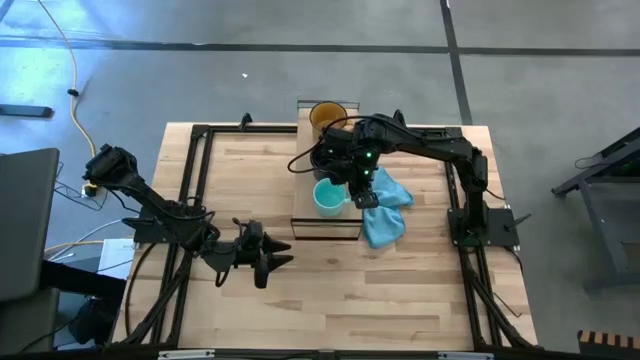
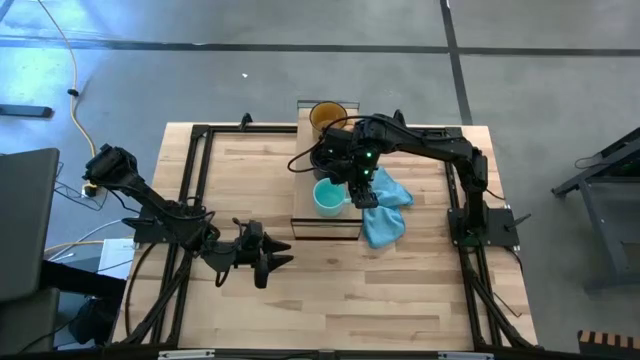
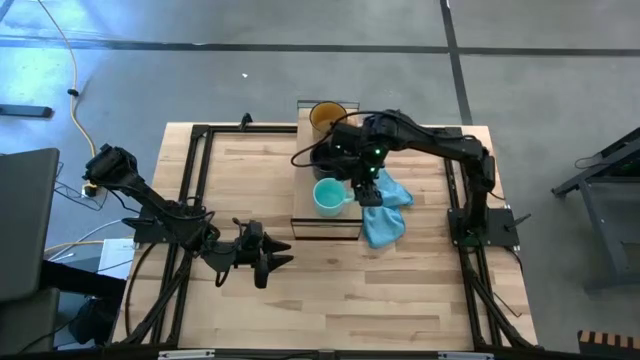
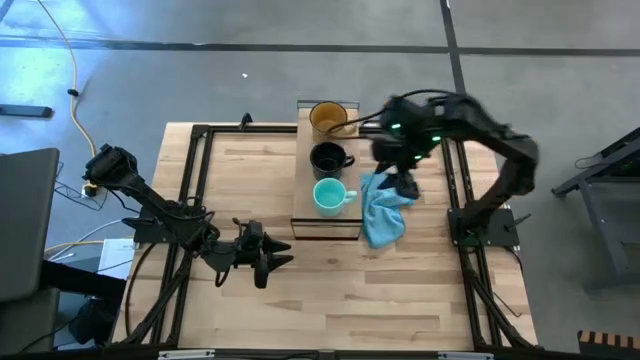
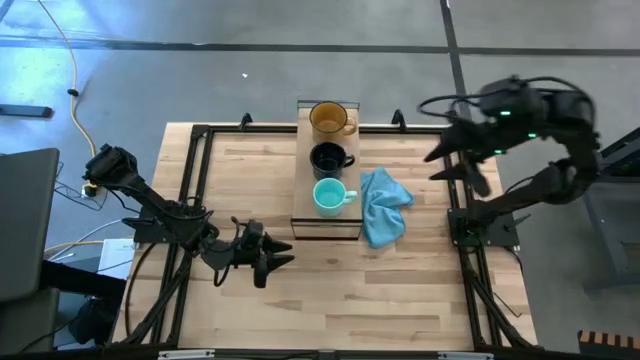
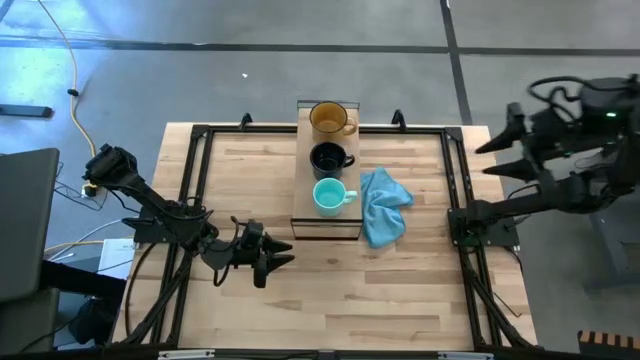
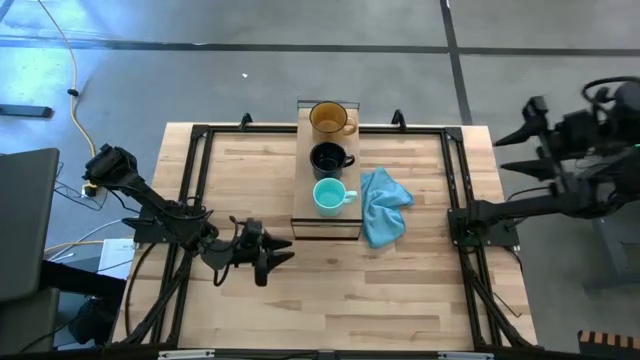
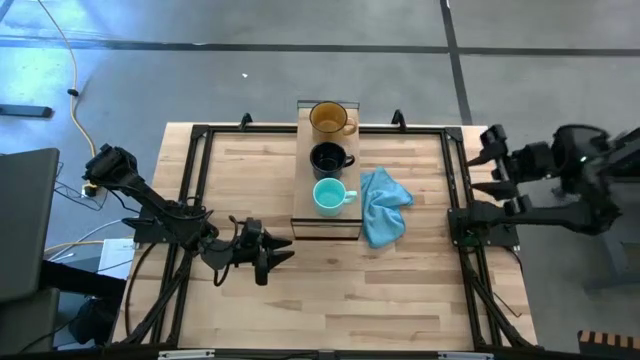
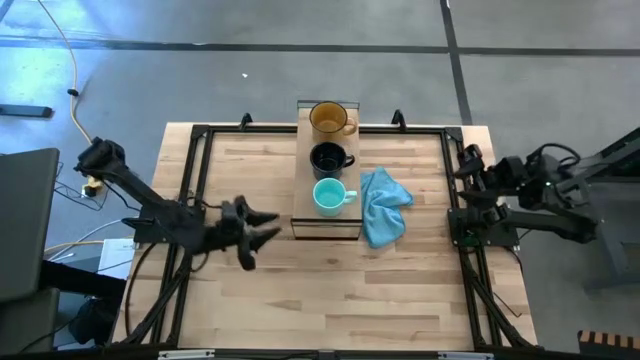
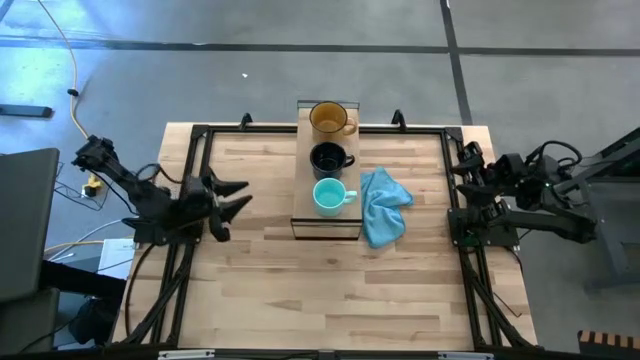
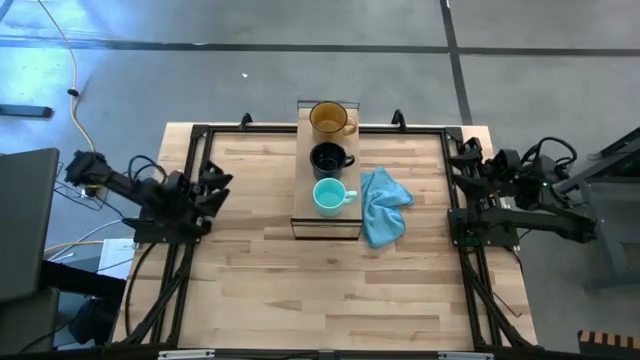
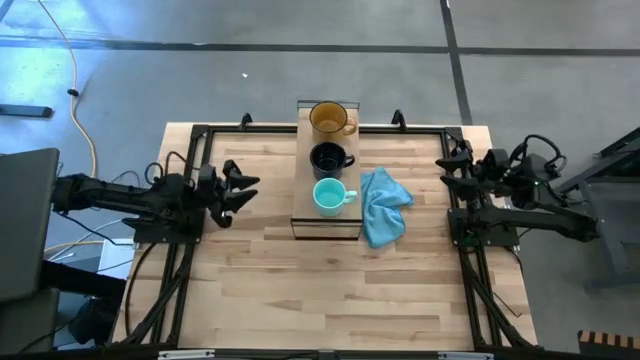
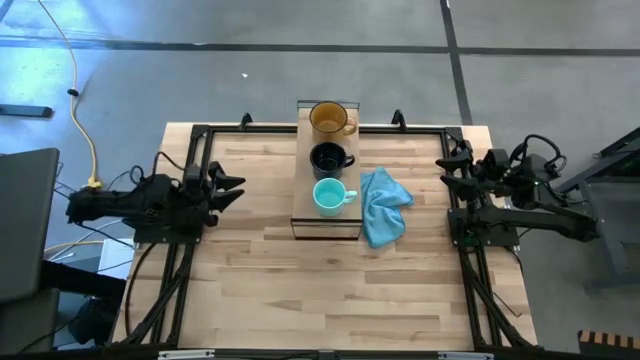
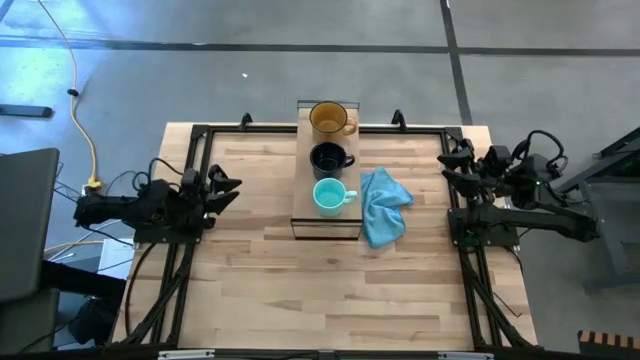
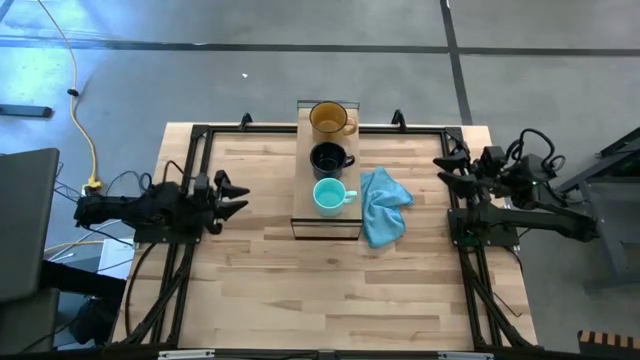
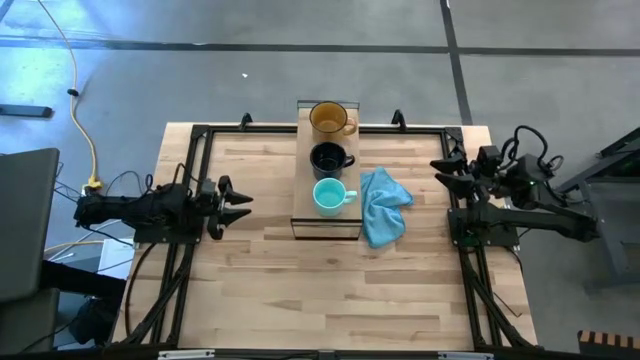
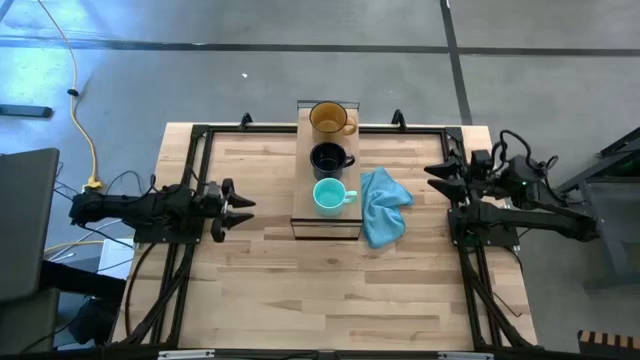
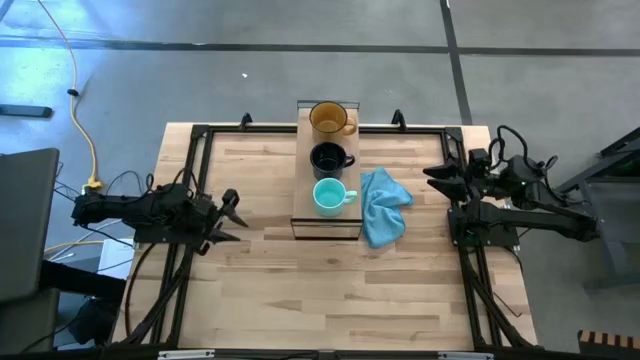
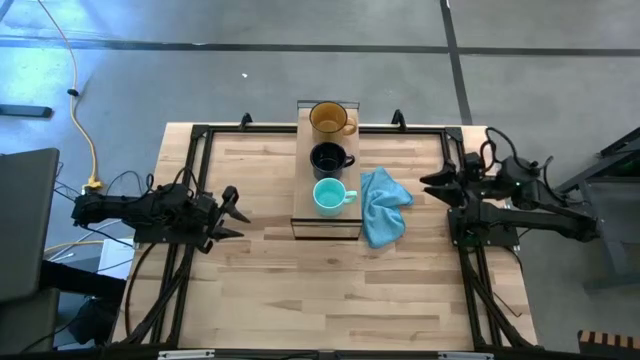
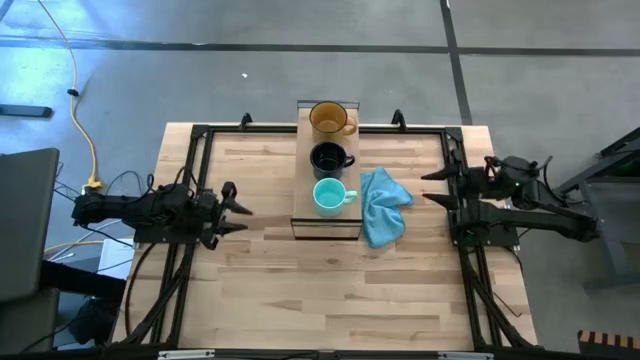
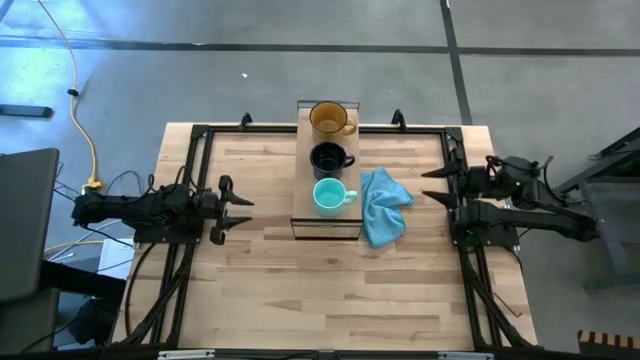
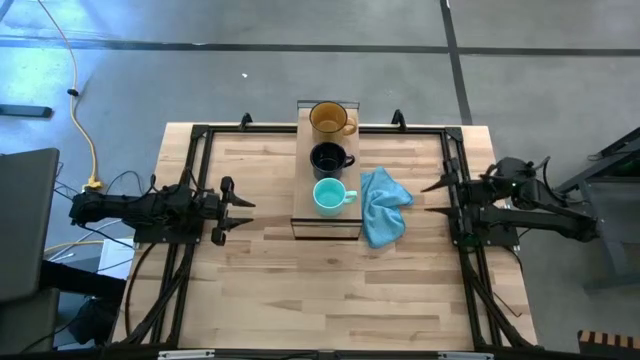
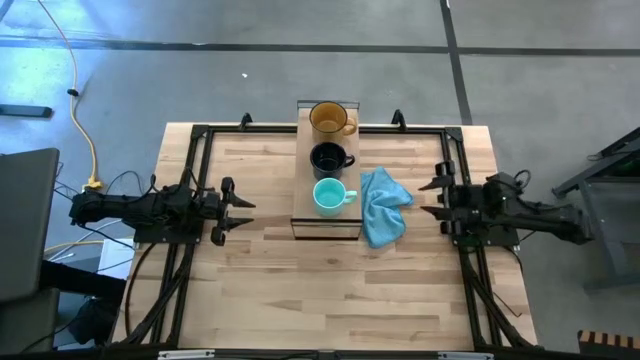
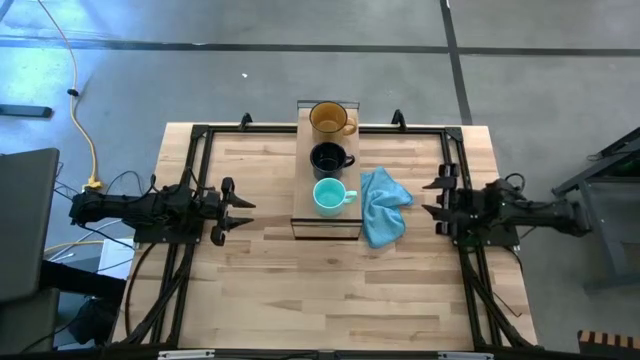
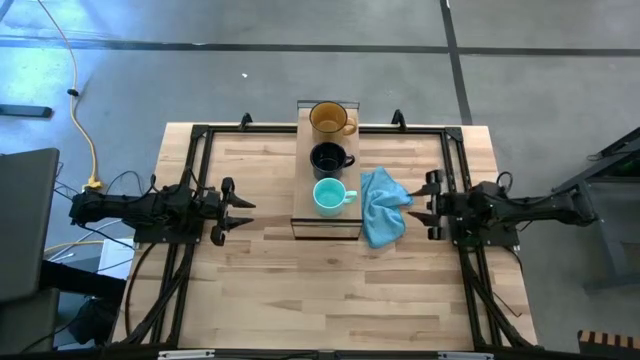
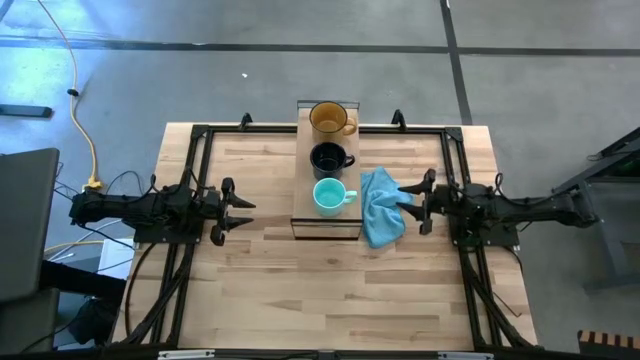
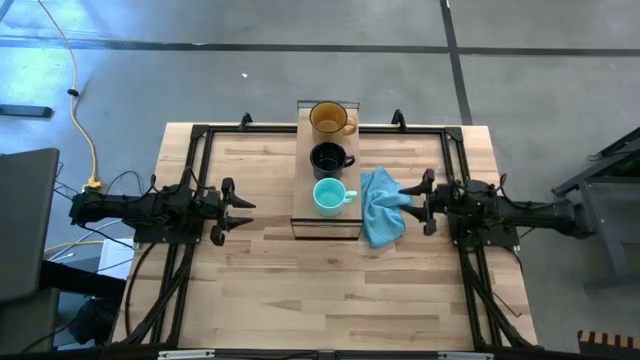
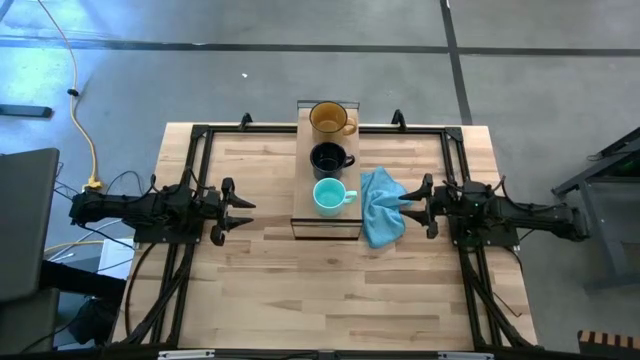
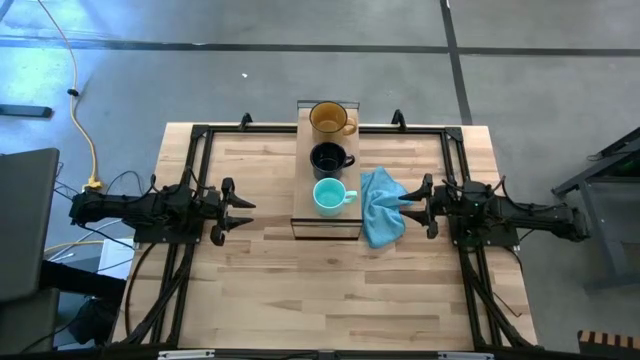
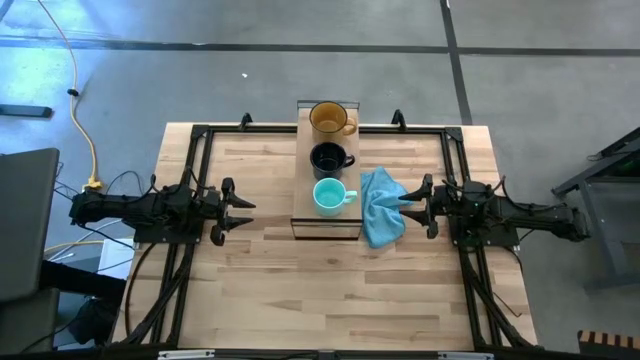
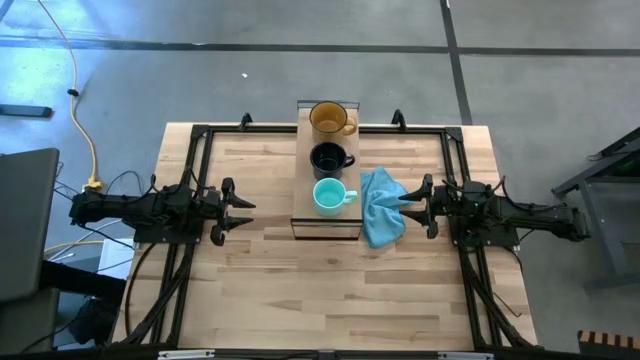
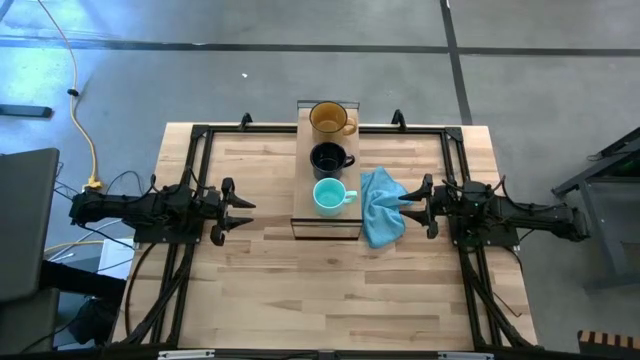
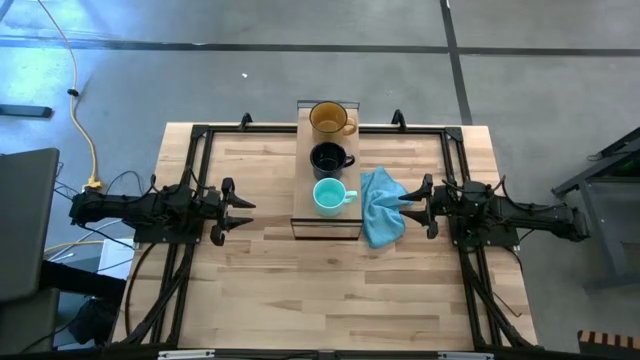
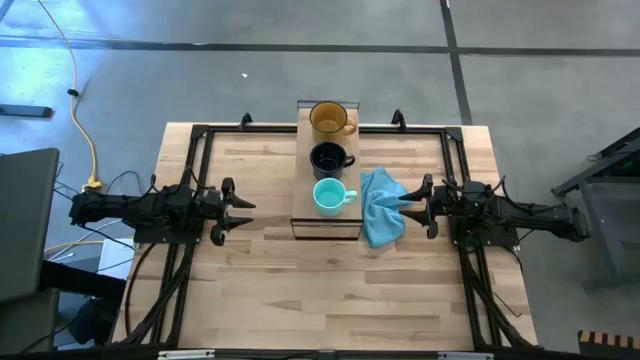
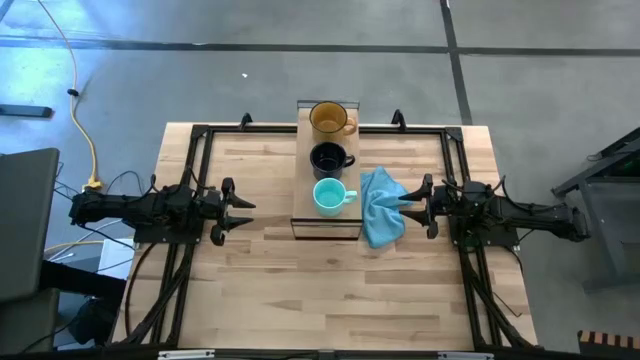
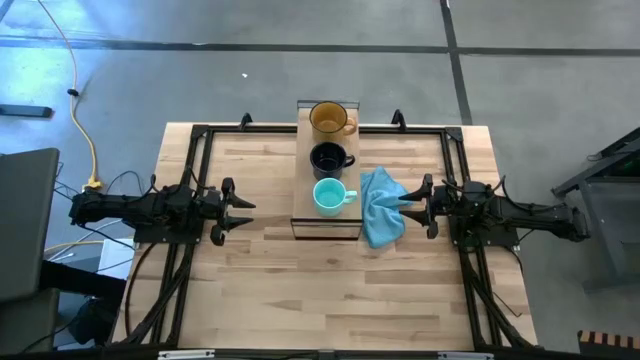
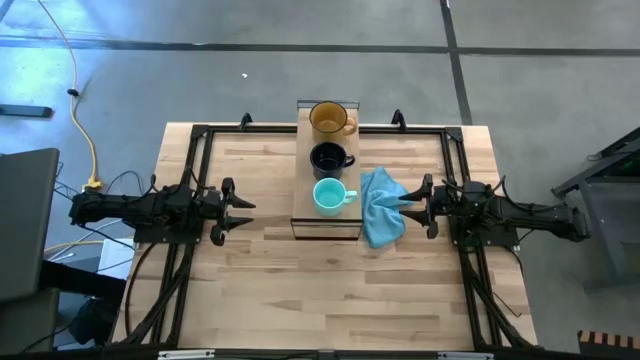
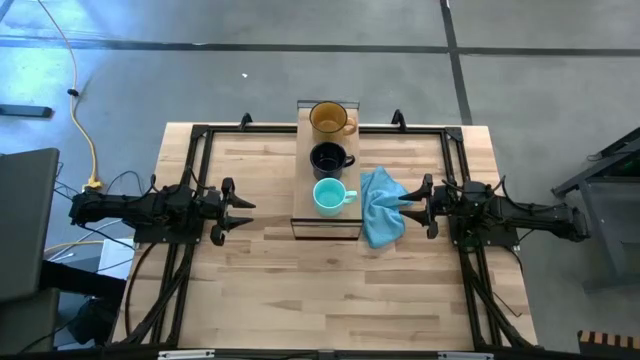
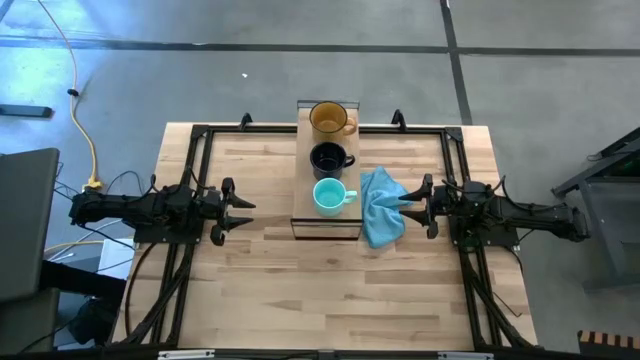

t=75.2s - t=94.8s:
Task: Stack small to large cups/mugs on shelf
Return to Home Position
